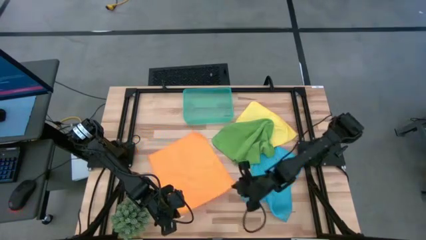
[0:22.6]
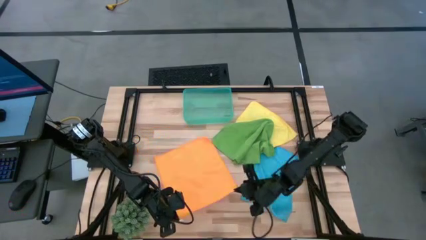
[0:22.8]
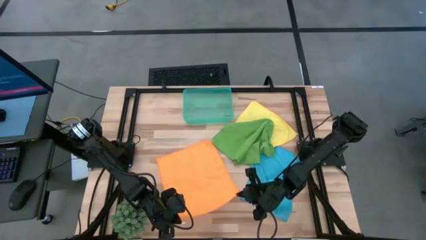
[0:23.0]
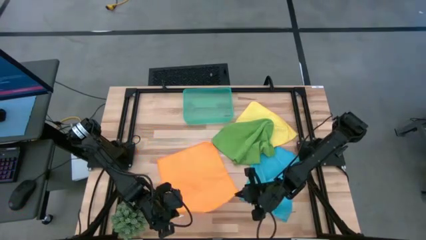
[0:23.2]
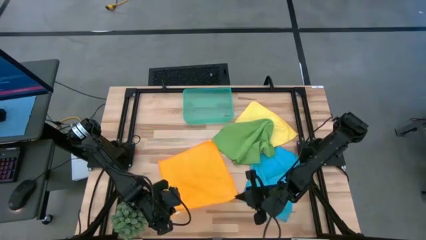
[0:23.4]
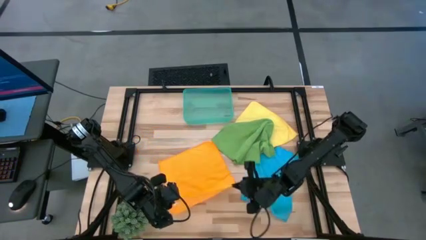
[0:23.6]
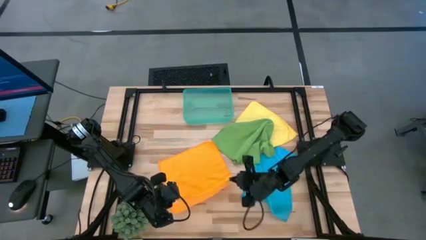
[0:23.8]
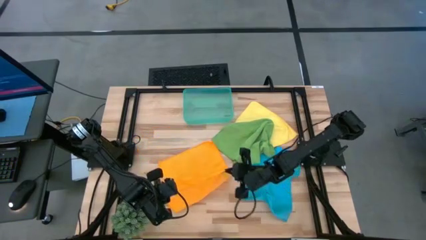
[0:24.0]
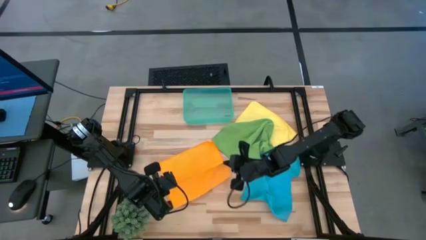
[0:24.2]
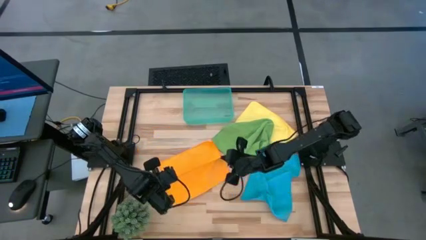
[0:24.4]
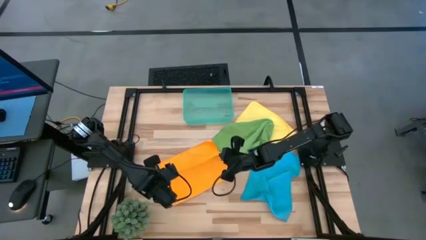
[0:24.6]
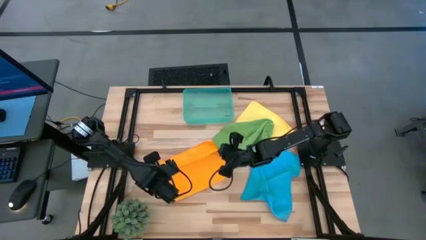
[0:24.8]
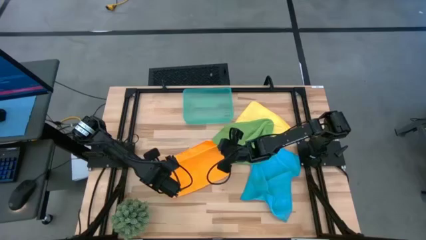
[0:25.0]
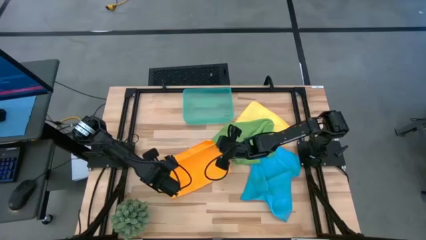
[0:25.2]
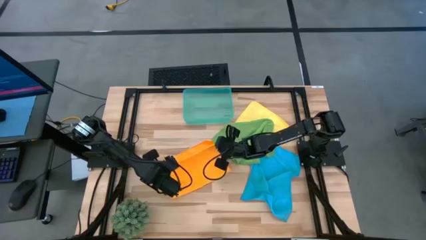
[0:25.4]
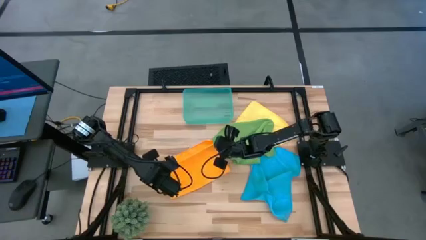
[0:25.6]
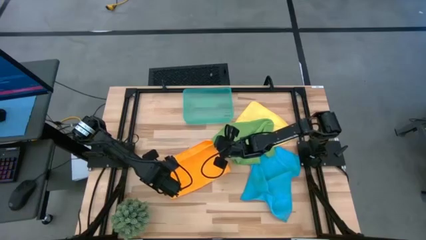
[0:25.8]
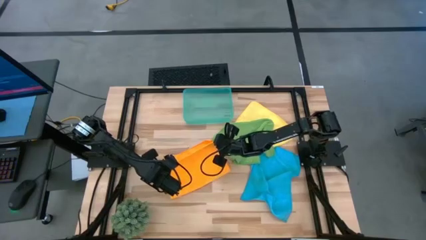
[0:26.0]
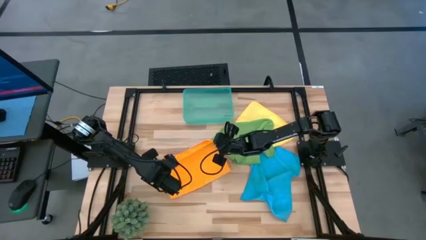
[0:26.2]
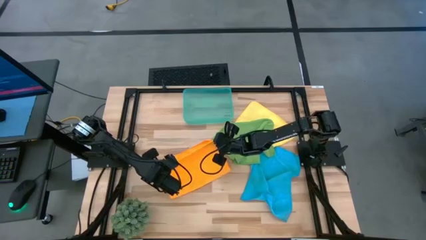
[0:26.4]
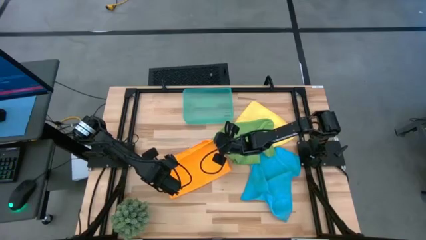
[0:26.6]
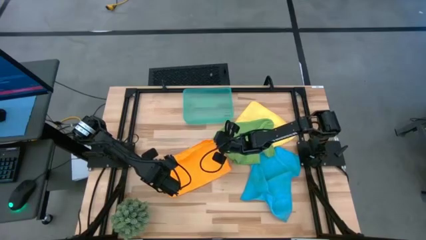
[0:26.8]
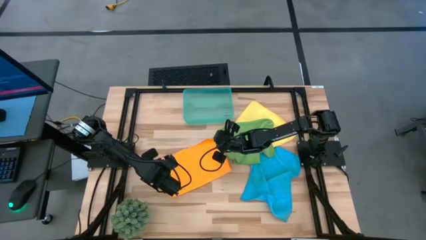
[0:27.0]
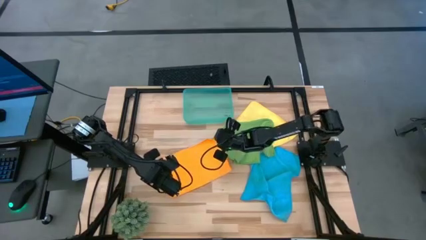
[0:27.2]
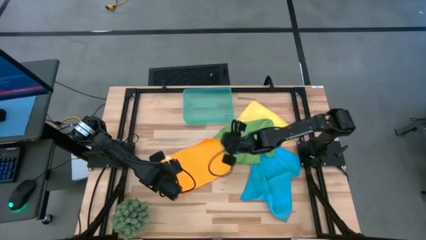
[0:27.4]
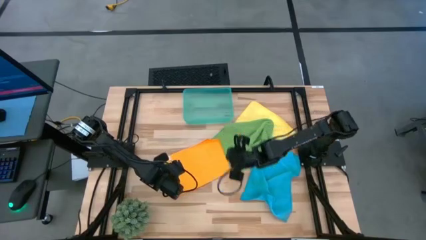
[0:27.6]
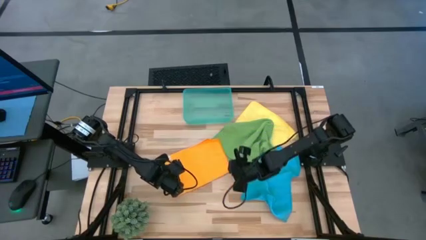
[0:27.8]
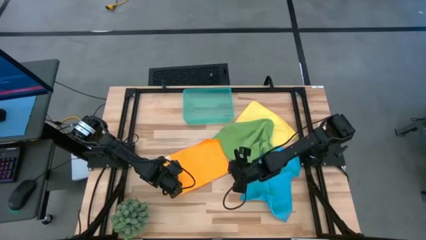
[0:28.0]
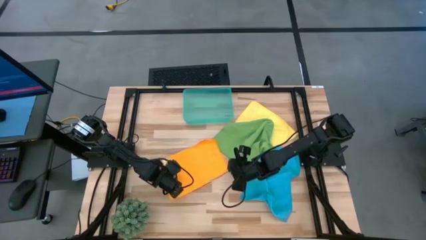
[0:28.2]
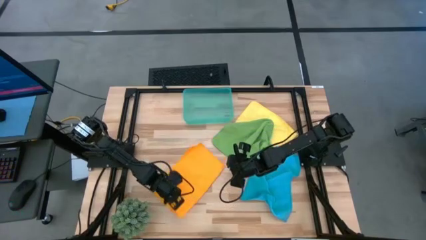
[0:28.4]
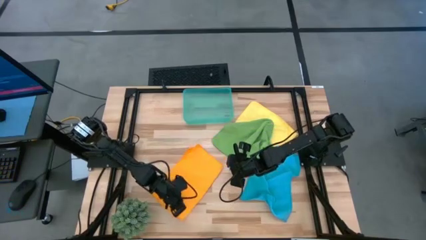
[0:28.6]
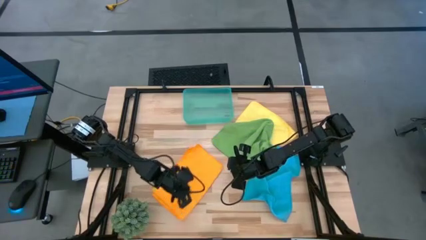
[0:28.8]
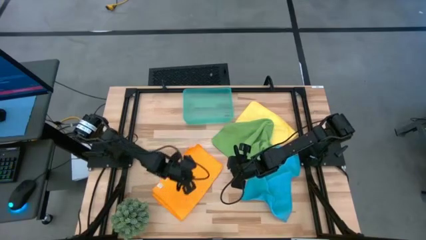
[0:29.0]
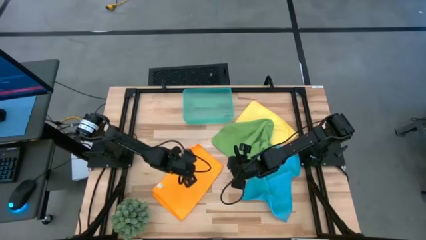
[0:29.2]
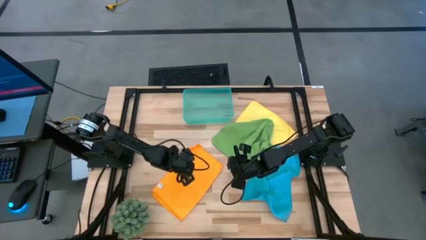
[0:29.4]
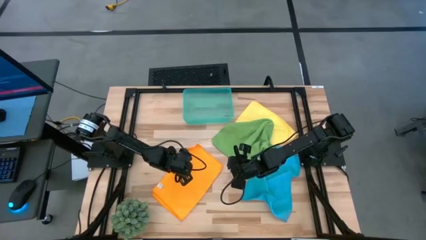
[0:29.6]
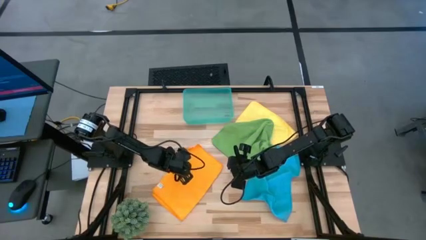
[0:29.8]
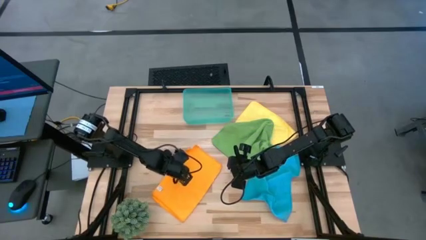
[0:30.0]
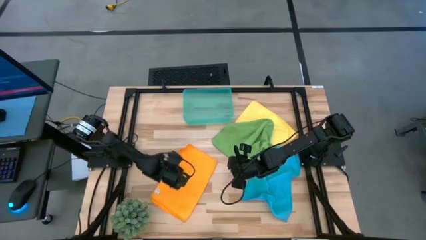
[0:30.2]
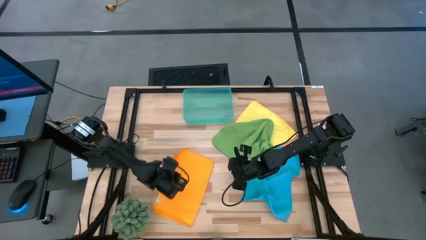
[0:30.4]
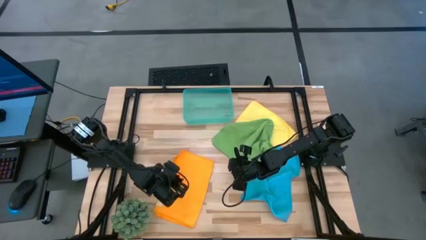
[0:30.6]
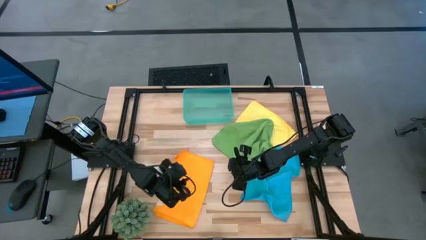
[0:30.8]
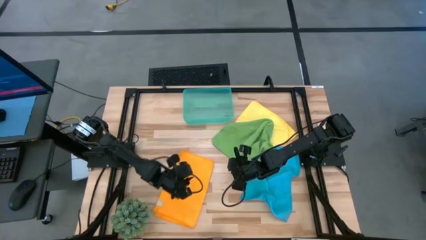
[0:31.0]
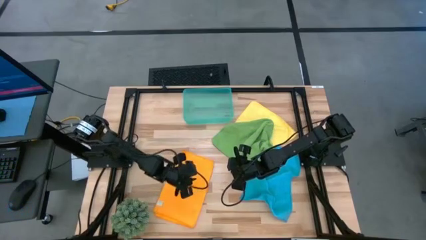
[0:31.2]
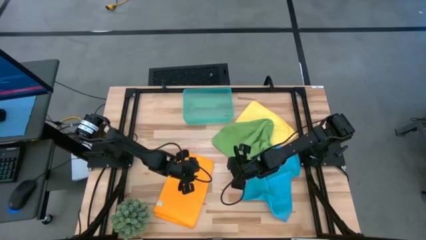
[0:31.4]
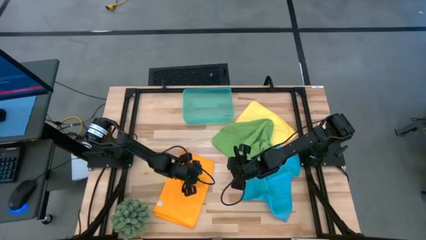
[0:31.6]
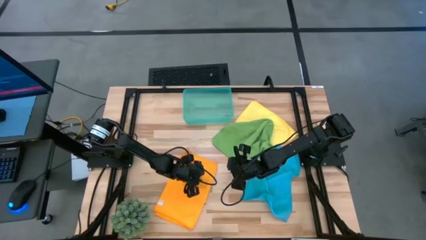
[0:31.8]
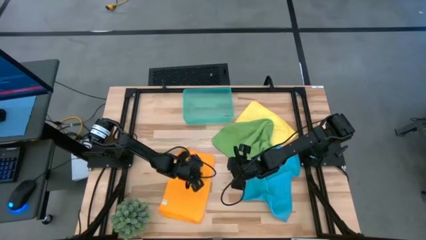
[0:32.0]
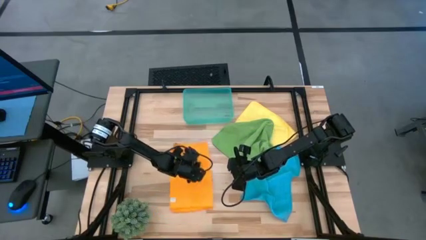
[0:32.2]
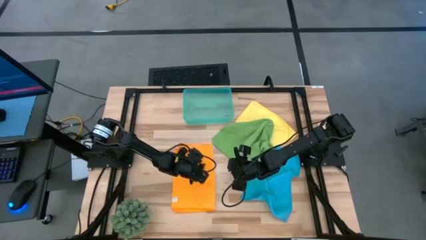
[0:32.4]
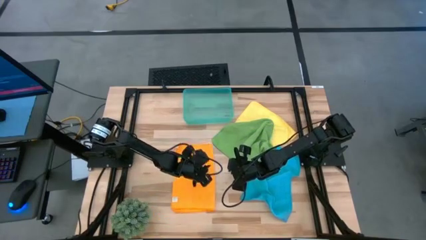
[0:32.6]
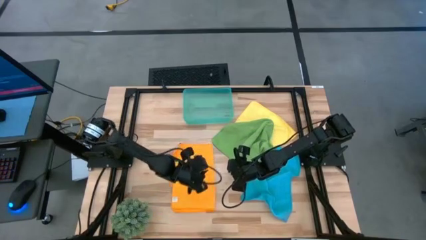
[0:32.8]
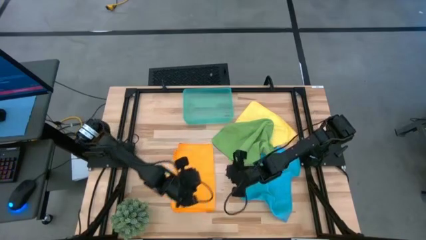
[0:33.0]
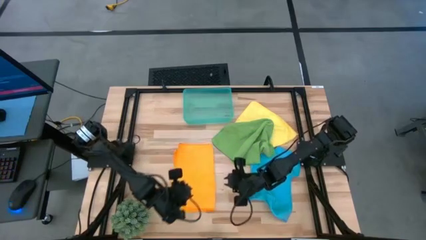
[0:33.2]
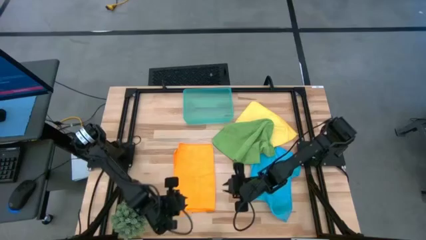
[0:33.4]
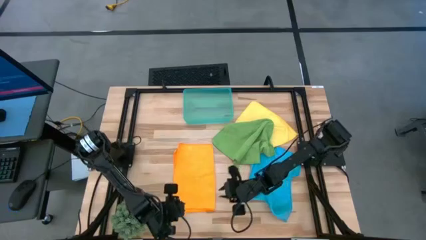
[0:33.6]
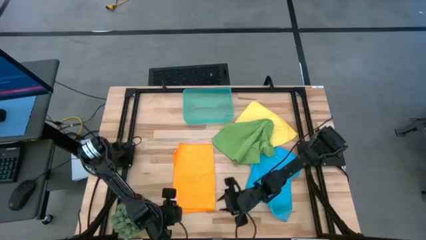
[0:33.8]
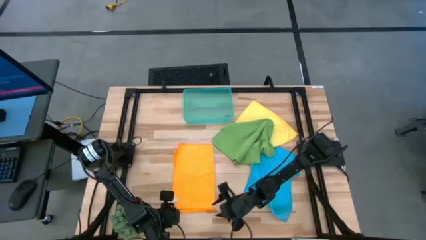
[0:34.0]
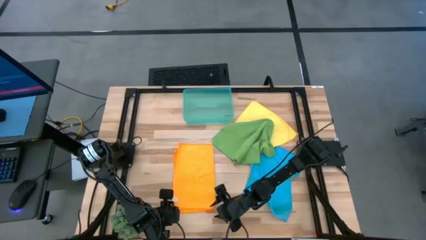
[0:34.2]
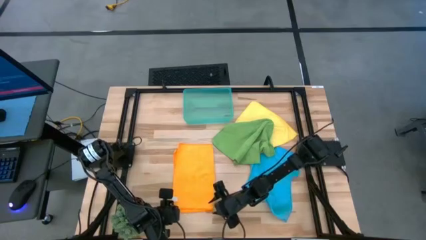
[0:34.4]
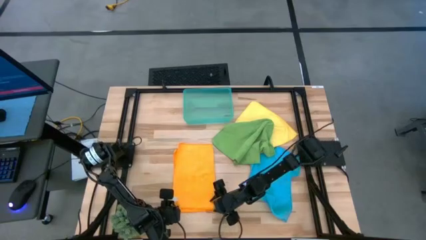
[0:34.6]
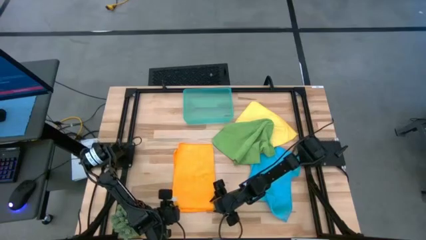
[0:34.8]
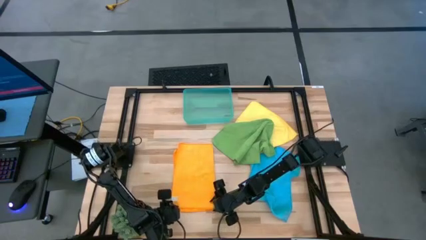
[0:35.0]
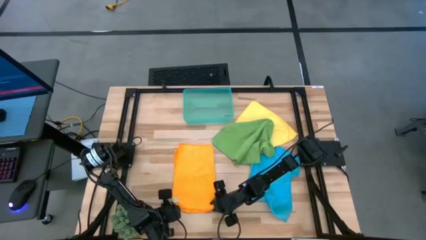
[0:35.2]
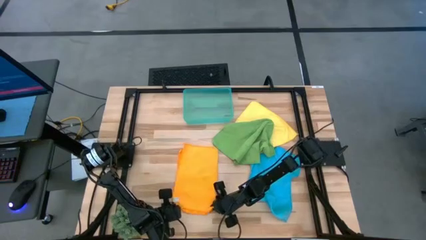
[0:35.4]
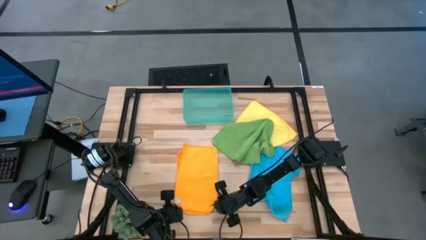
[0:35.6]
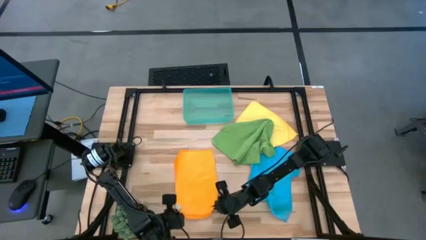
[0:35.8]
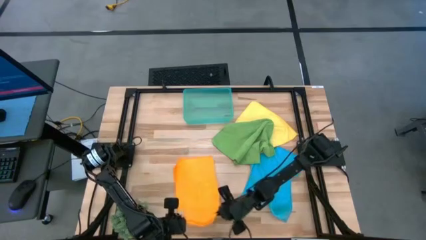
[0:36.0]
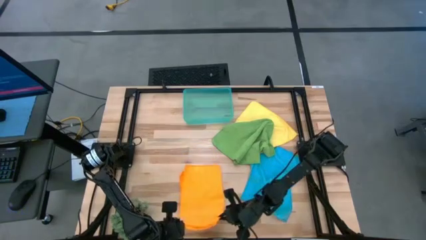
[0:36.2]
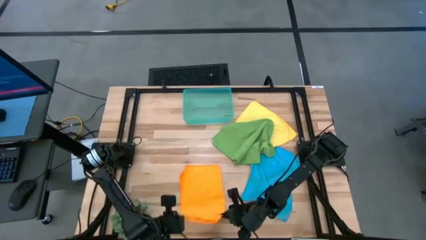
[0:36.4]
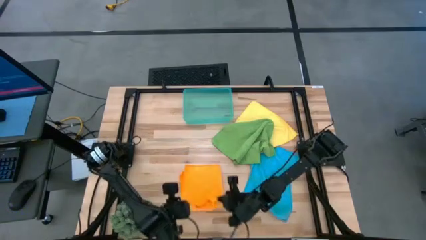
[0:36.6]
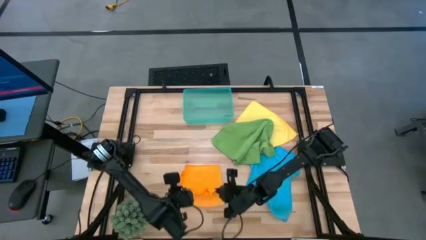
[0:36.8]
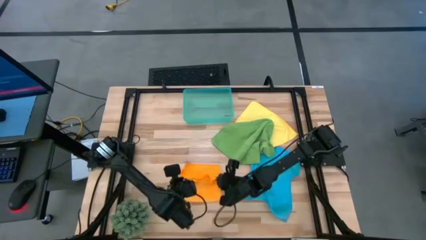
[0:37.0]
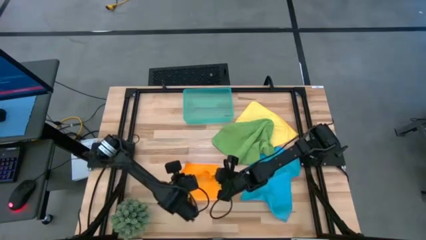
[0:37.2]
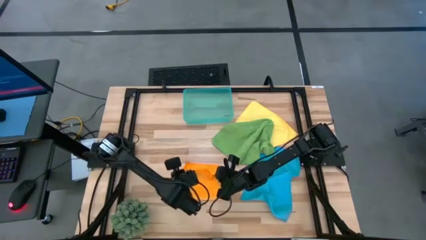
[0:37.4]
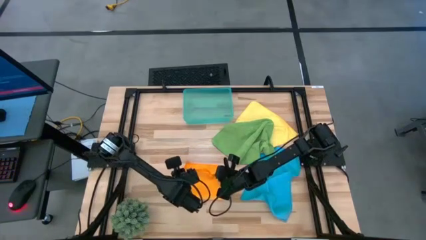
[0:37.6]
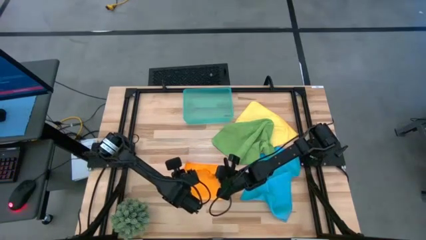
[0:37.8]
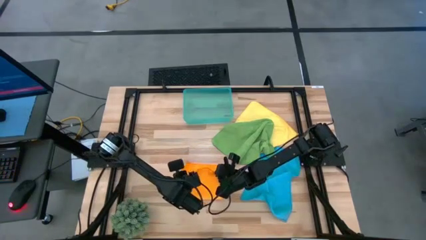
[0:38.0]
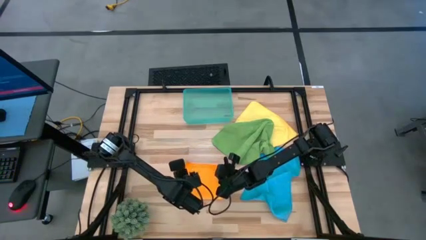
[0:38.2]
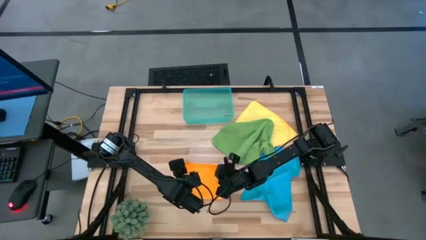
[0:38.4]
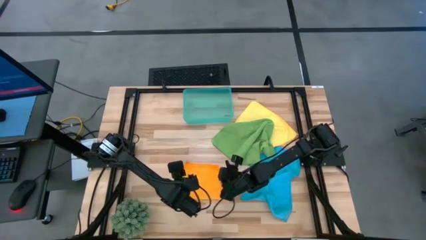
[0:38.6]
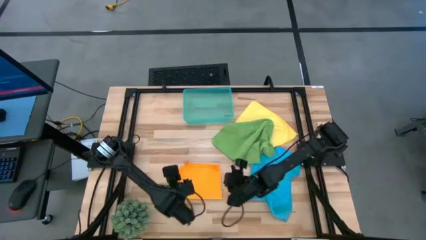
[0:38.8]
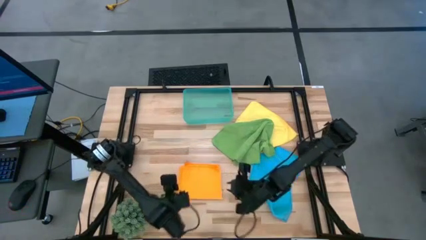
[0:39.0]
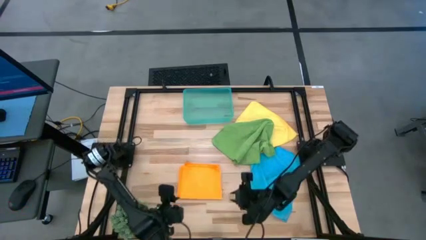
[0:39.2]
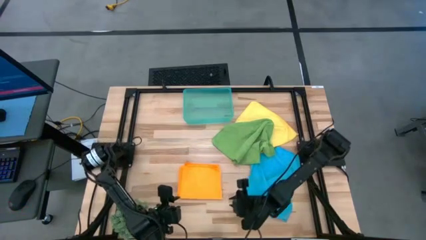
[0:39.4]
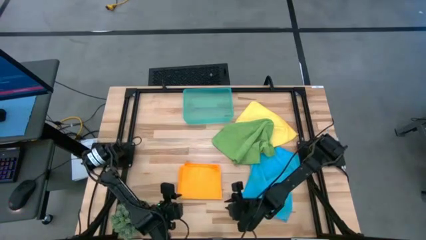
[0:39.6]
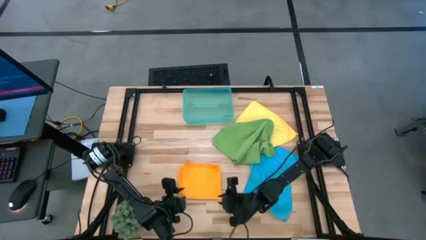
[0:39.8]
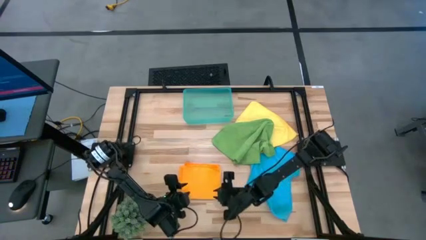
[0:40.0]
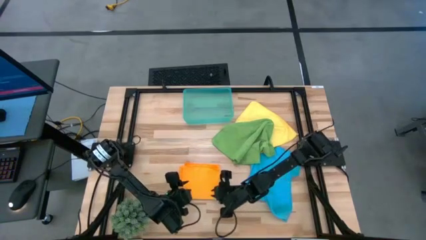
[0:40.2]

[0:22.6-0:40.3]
Task: Roll microfiber towels into tight, uniform cylinder then place into a basket
Fold the orange towel
